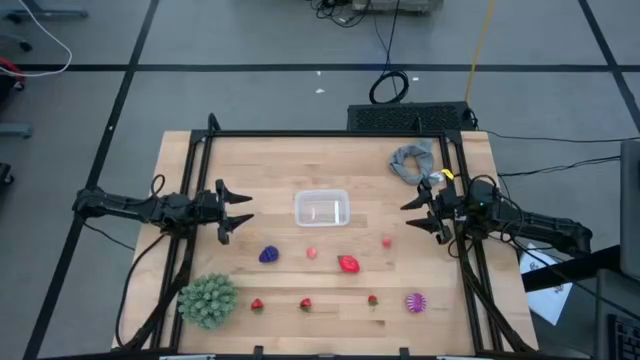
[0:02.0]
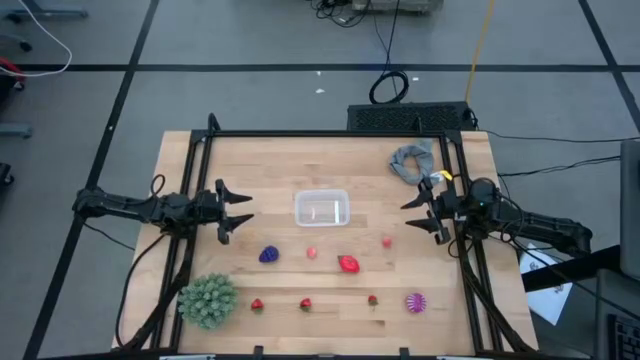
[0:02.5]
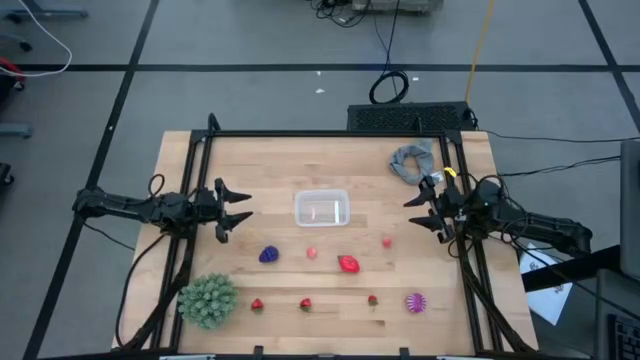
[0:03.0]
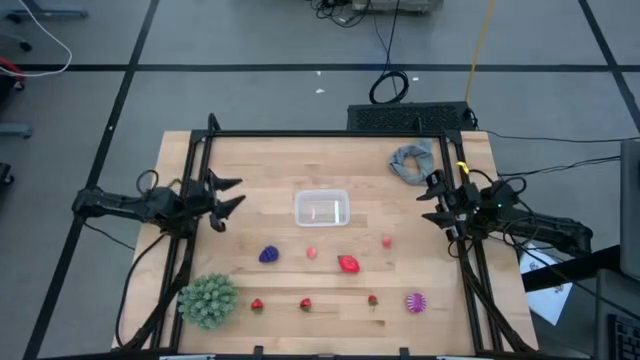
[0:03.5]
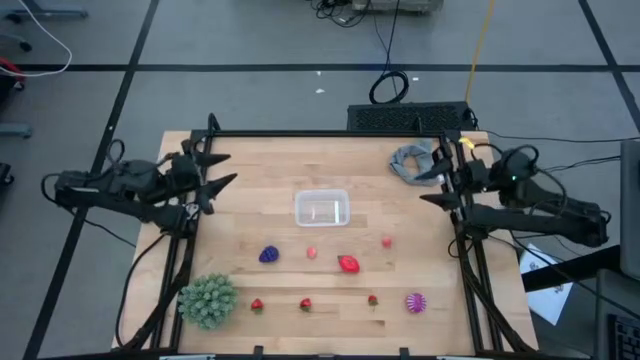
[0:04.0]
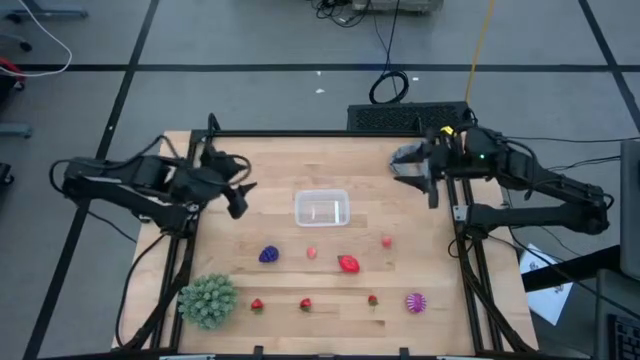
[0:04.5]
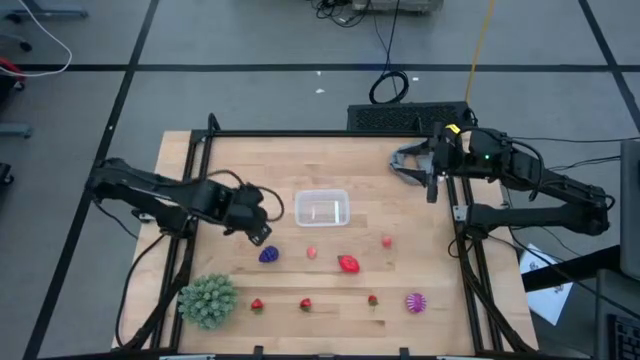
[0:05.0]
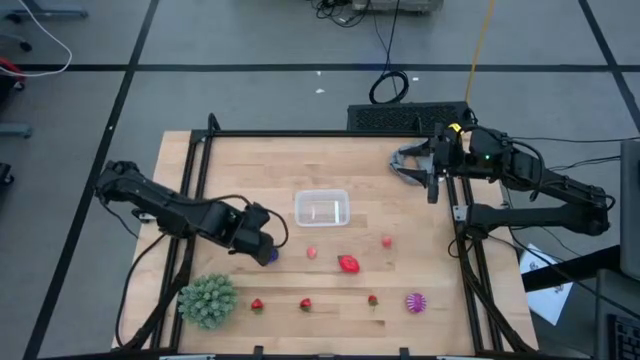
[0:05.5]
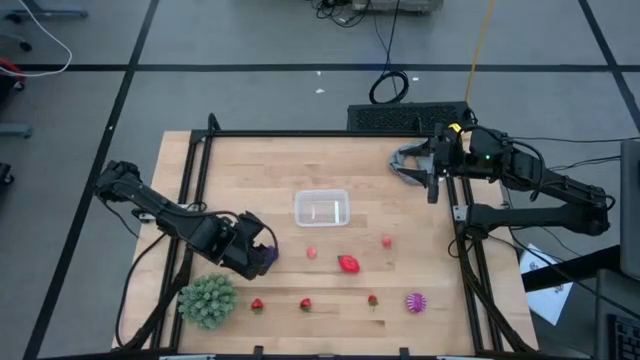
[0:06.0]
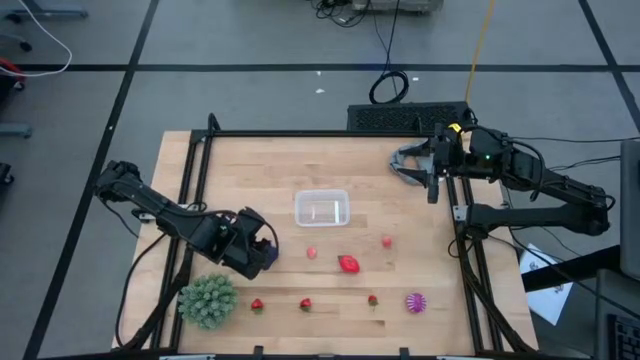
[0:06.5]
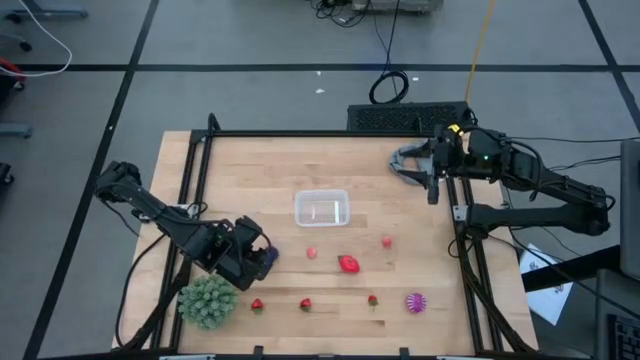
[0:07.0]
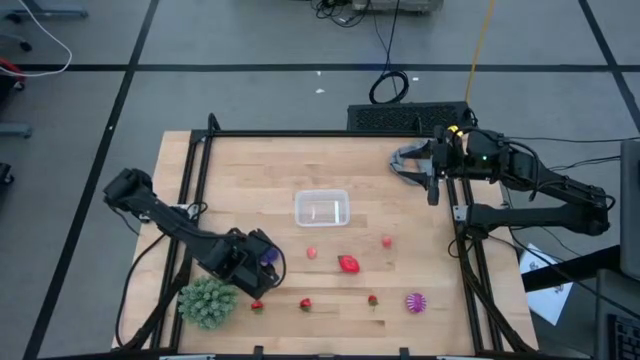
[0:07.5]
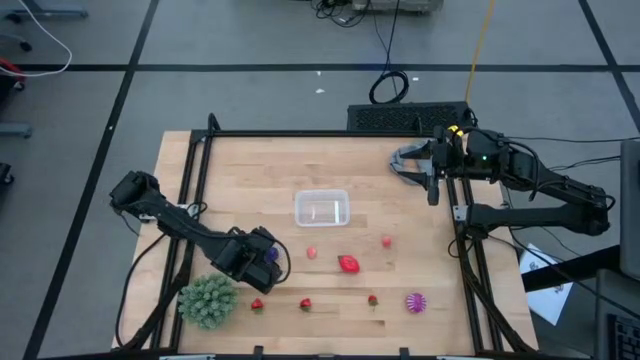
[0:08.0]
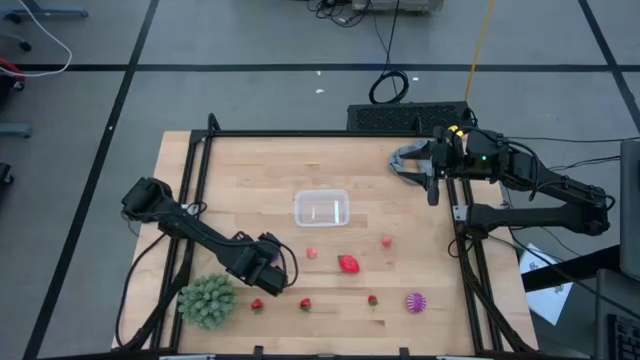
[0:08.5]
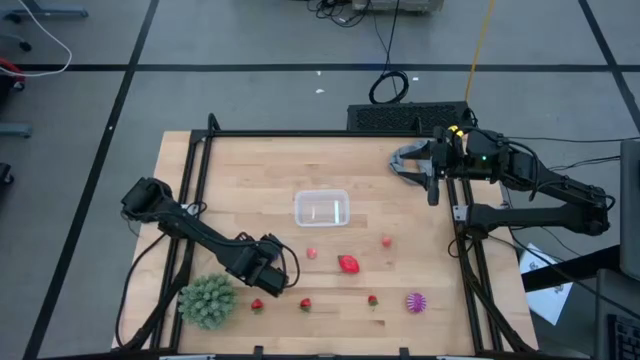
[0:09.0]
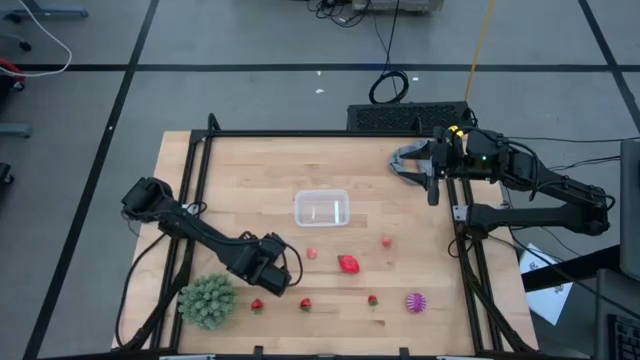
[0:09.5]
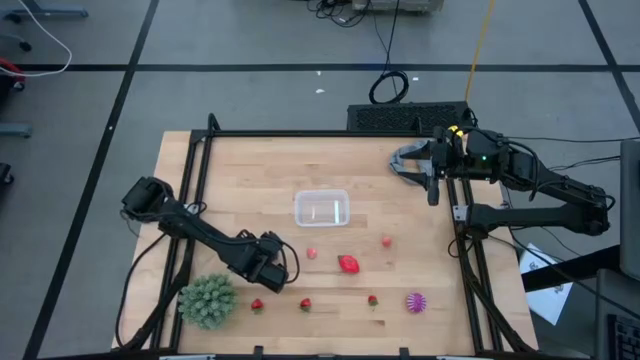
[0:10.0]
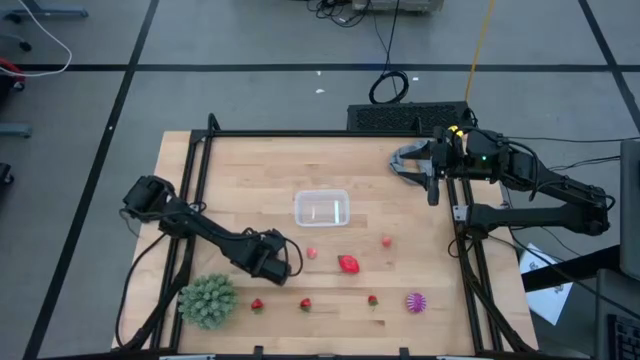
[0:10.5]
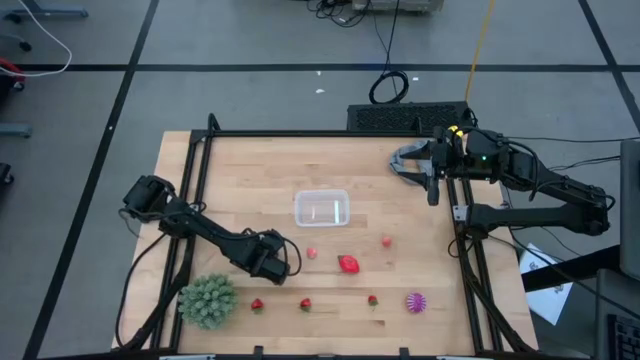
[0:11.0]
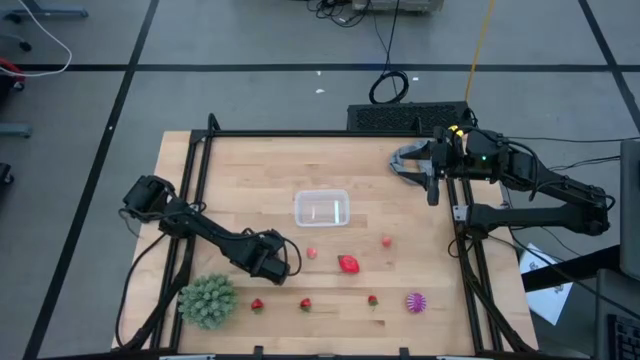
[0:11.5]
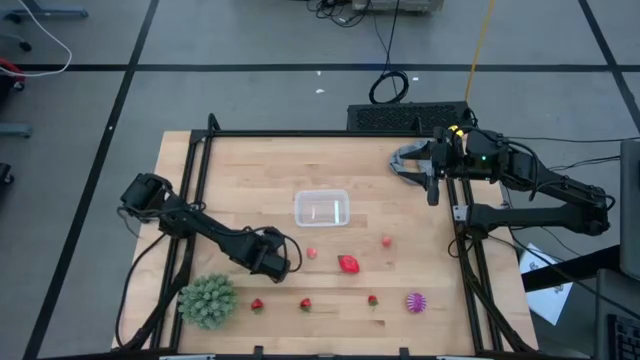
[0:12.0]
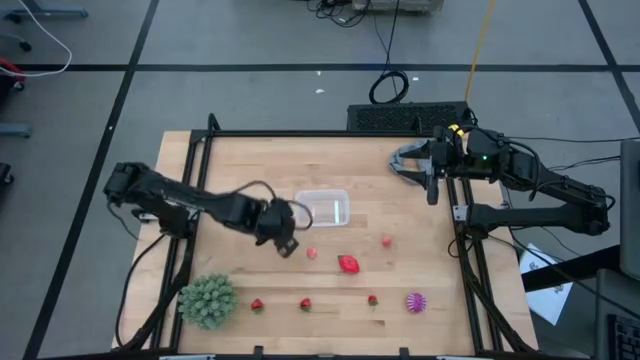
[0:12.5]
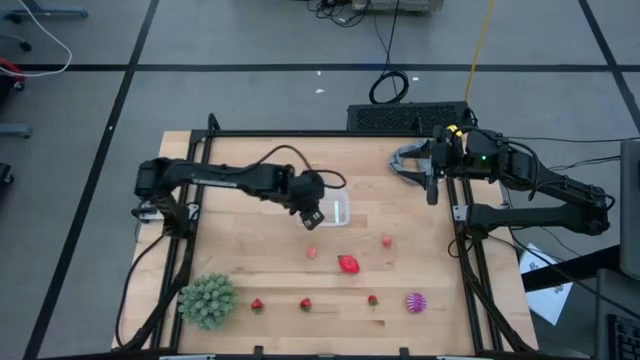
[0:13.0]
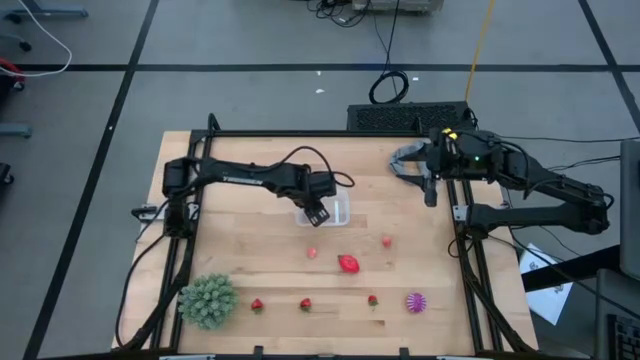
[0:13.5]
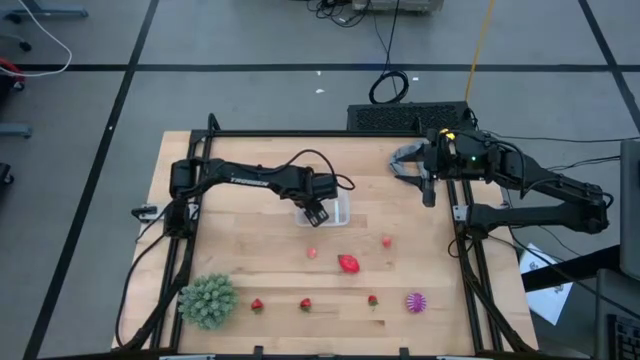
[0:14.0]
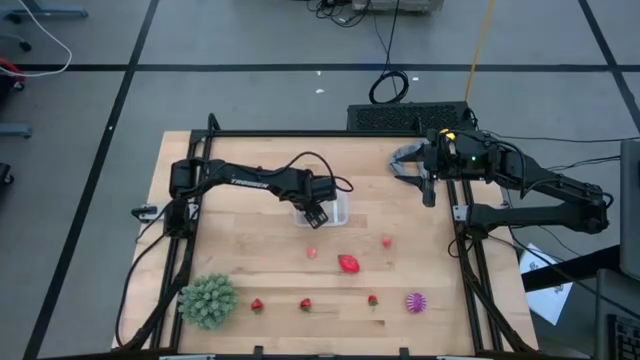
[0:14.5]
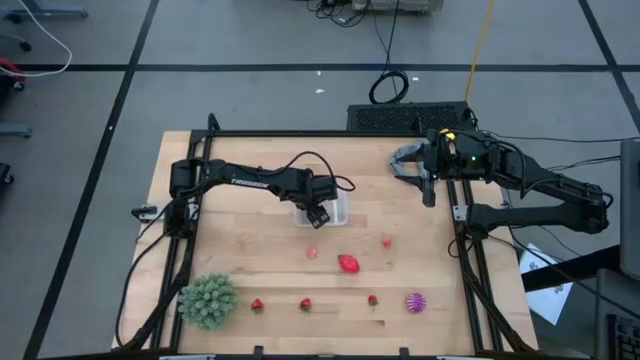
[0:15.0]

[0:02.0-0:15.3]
Task: Pick and placing Produce into tupperware
Put the grape into the transparent bin

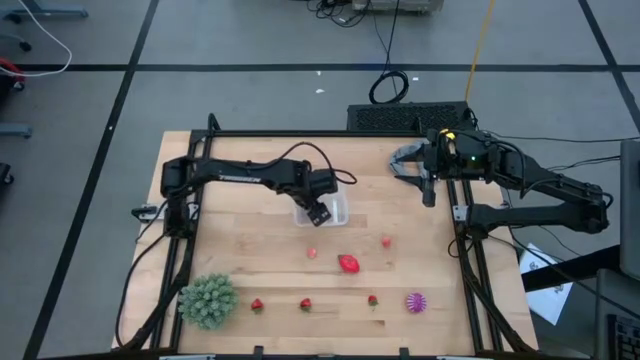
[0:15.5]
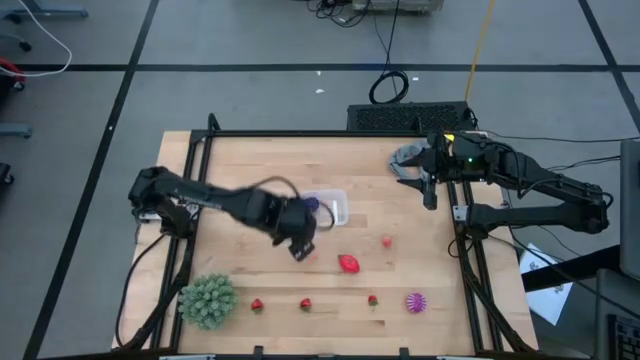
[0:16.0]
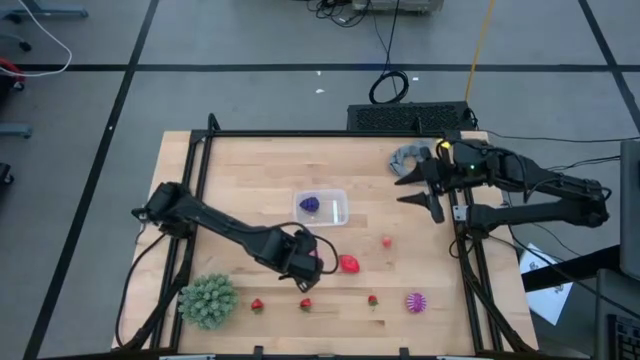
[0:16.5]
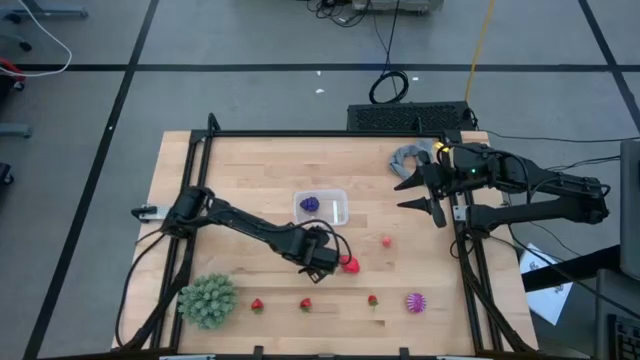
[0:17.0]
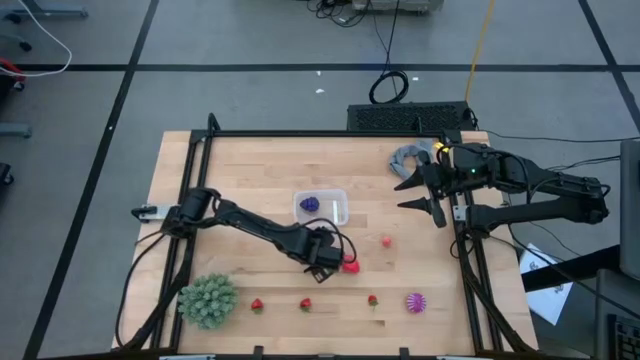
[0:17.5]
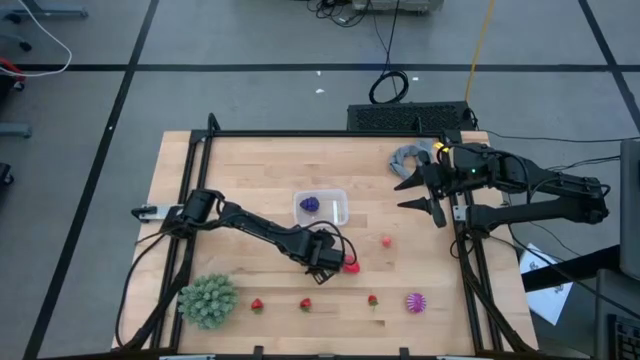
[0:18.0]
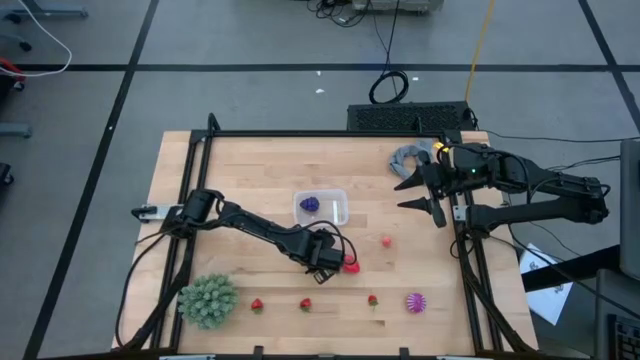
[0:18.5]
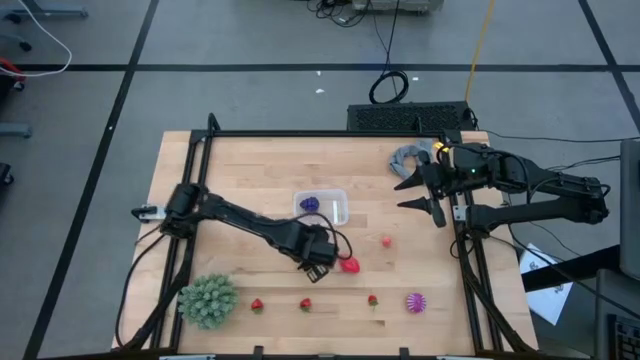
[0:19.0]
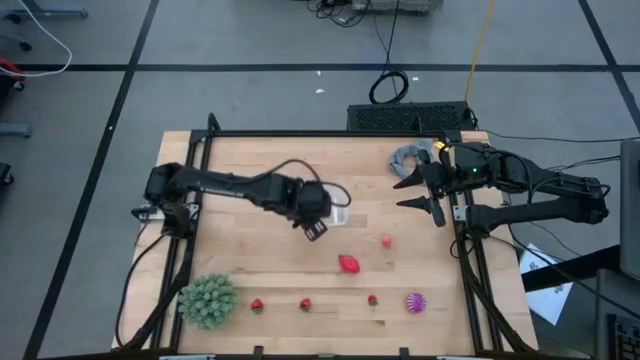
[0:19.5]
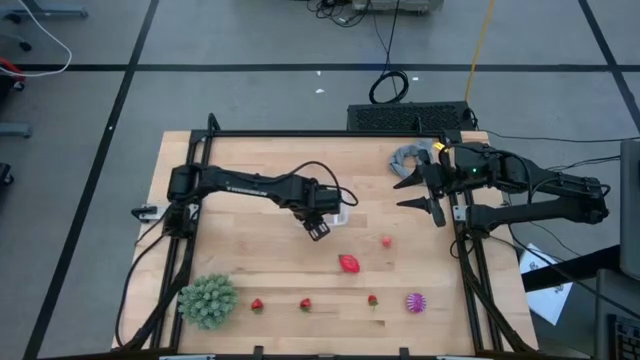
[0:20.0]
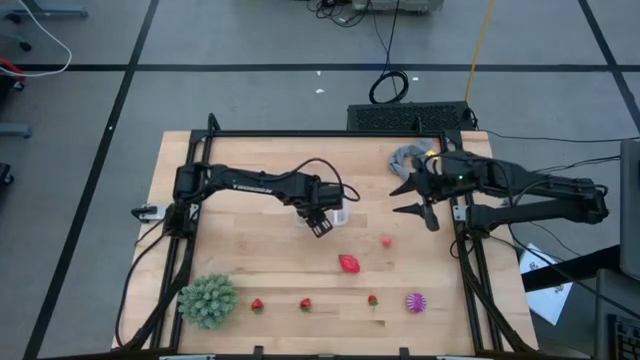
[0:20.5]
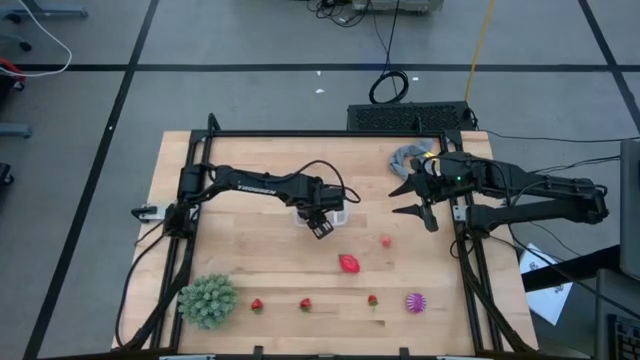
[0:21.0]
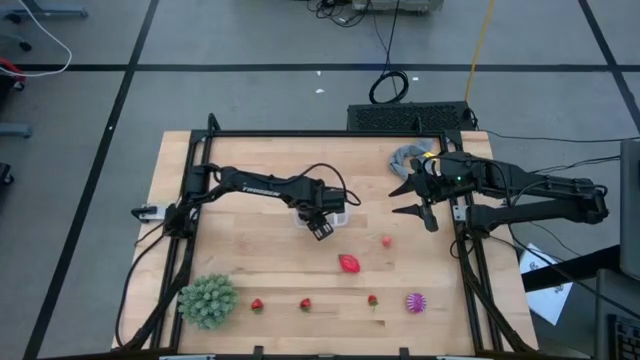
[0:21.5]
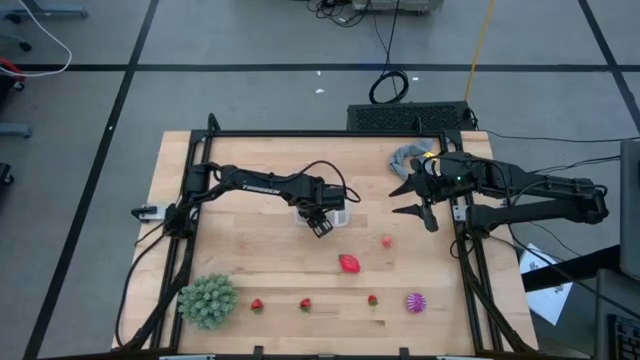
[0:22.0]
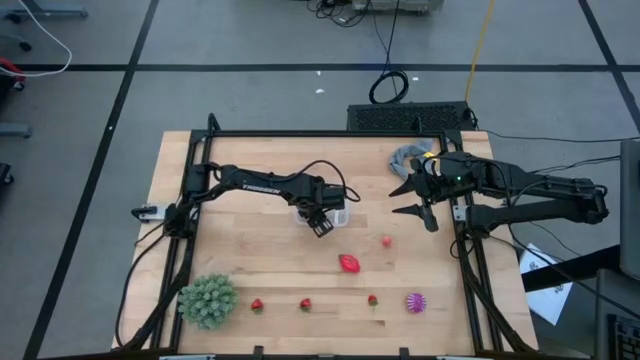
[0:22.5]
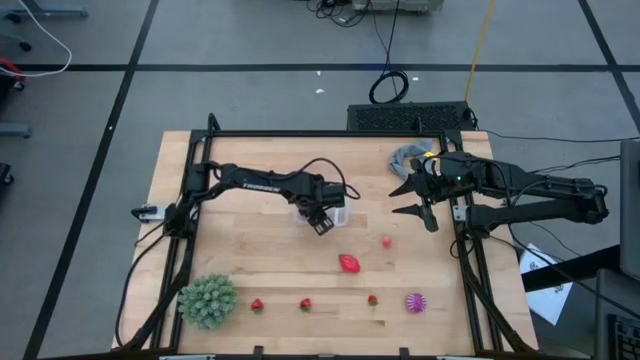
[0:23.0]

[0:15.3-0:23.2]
Put the left apricot into the transparent bin
